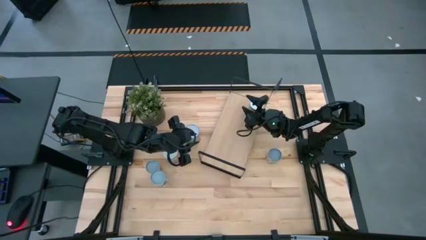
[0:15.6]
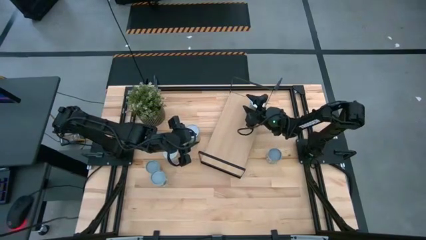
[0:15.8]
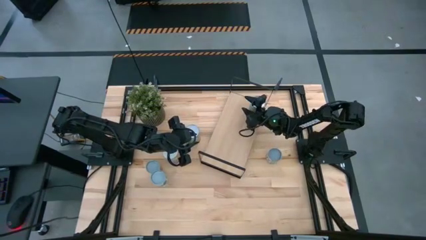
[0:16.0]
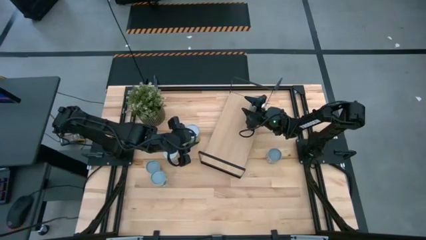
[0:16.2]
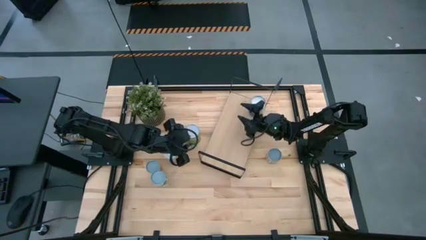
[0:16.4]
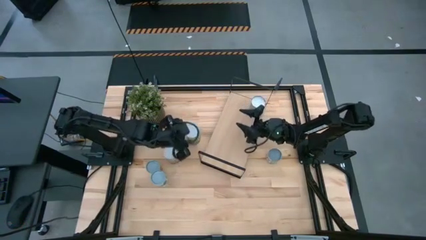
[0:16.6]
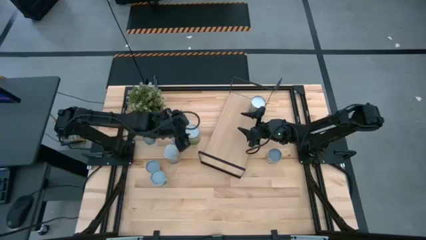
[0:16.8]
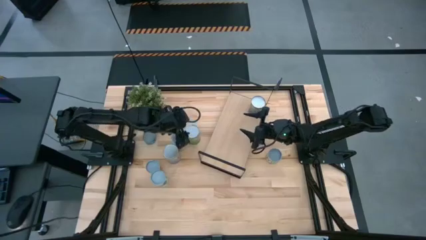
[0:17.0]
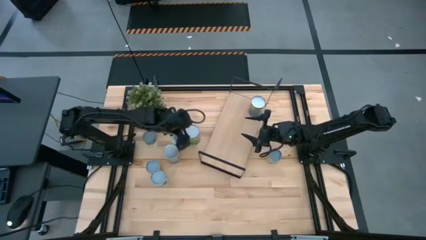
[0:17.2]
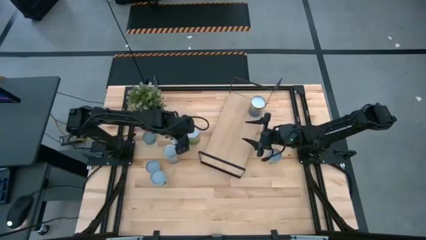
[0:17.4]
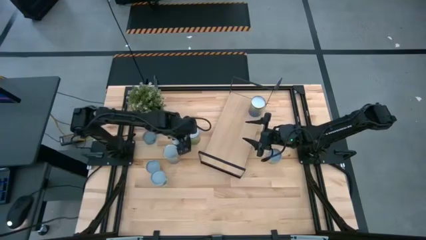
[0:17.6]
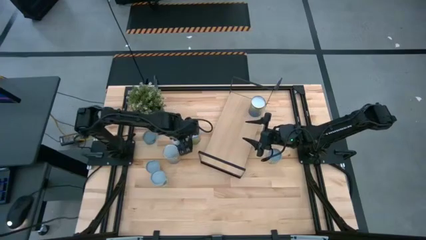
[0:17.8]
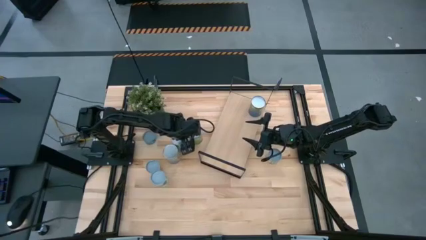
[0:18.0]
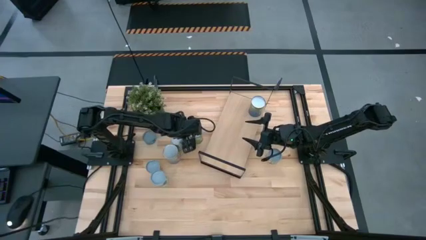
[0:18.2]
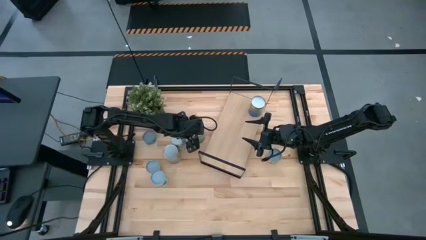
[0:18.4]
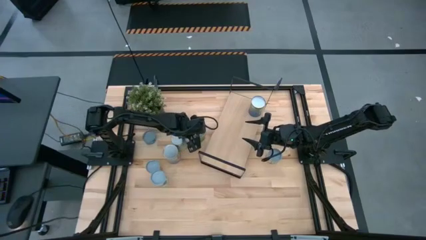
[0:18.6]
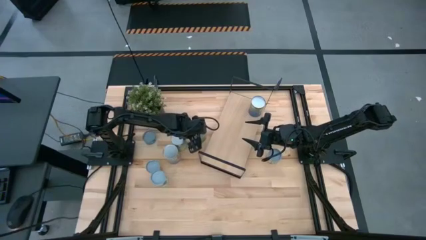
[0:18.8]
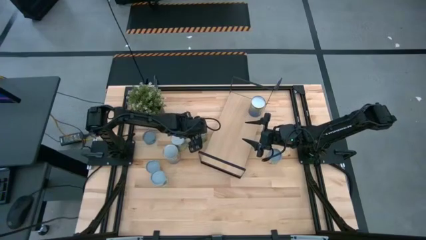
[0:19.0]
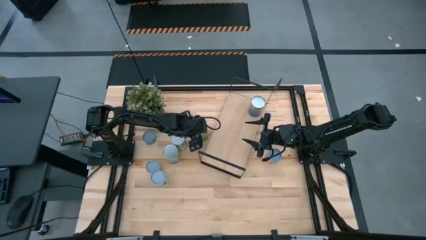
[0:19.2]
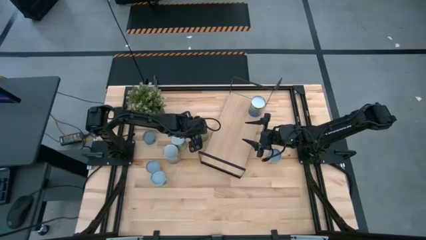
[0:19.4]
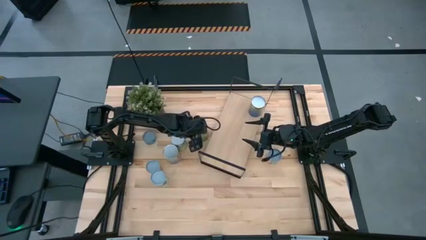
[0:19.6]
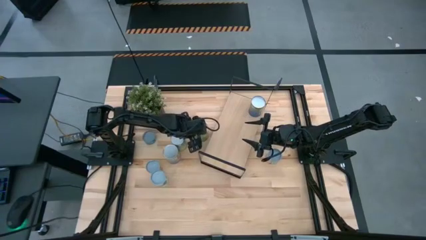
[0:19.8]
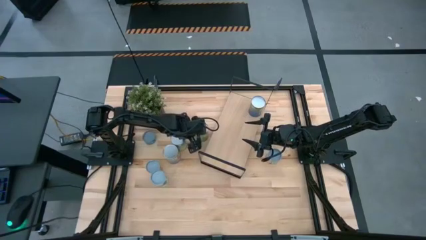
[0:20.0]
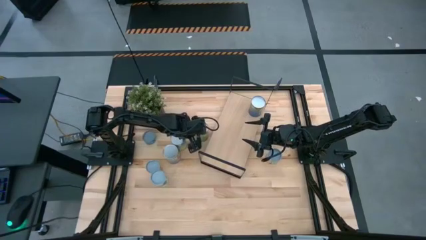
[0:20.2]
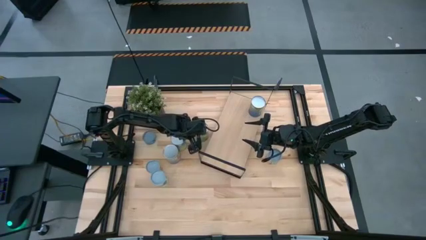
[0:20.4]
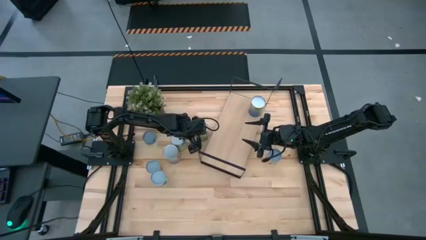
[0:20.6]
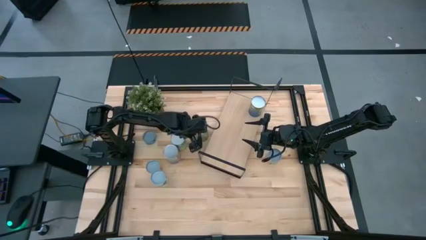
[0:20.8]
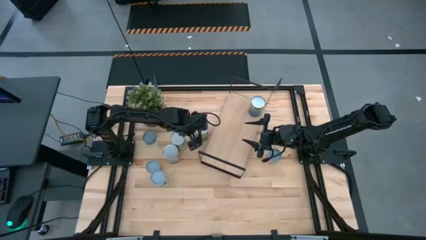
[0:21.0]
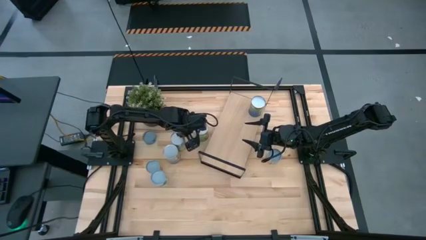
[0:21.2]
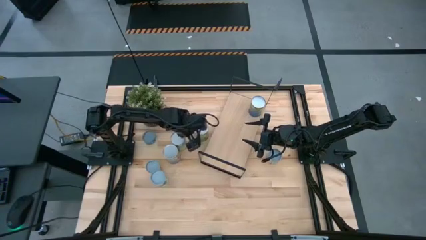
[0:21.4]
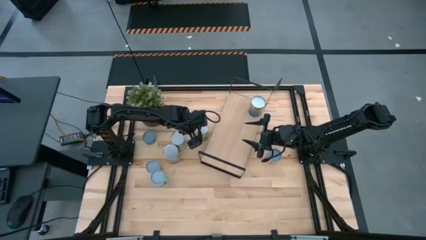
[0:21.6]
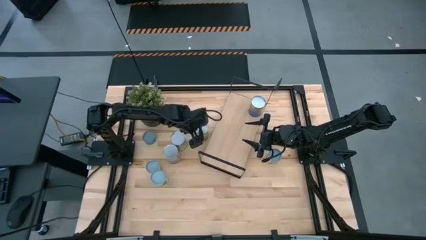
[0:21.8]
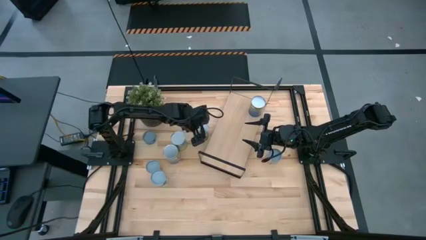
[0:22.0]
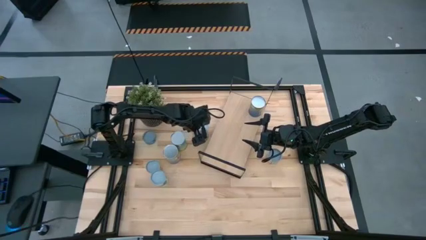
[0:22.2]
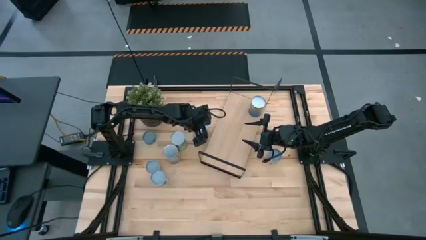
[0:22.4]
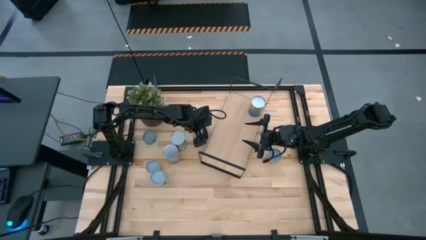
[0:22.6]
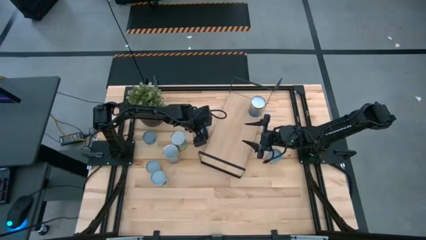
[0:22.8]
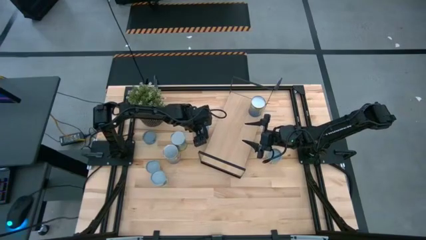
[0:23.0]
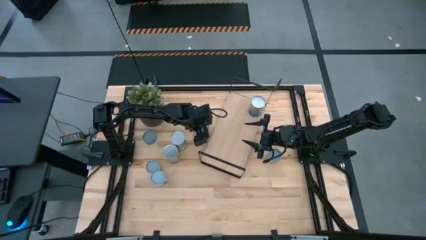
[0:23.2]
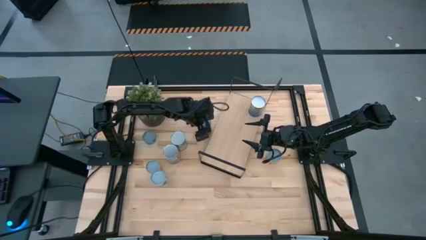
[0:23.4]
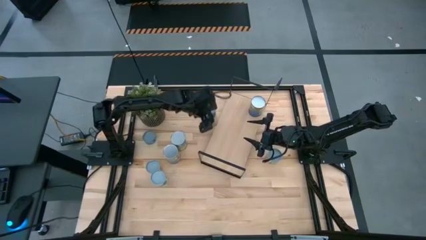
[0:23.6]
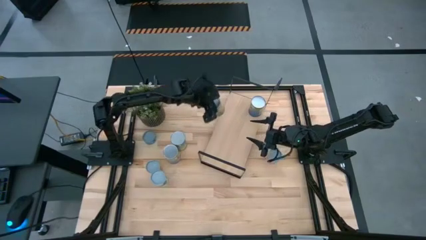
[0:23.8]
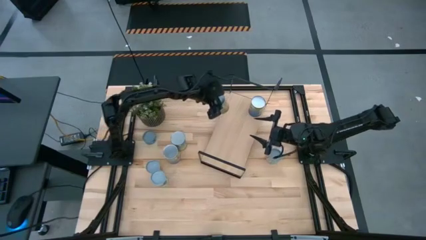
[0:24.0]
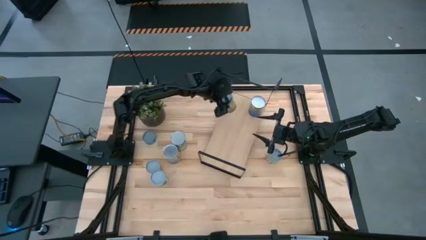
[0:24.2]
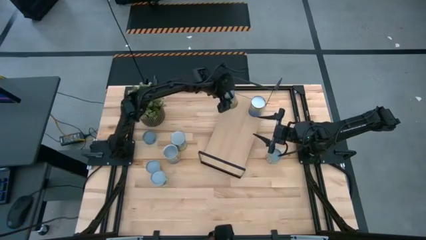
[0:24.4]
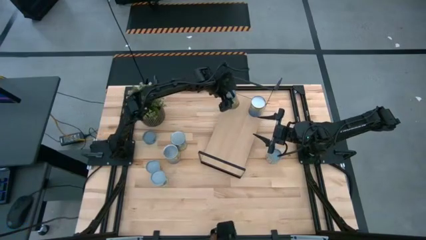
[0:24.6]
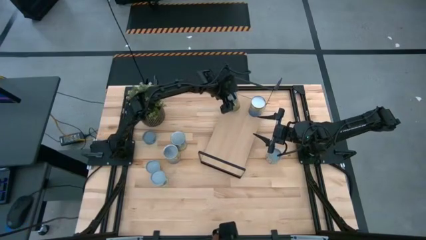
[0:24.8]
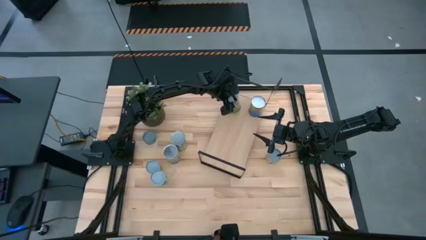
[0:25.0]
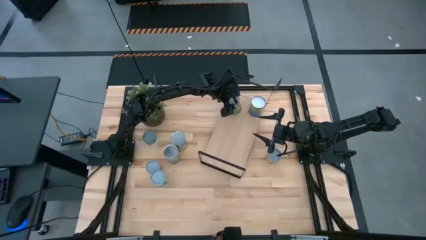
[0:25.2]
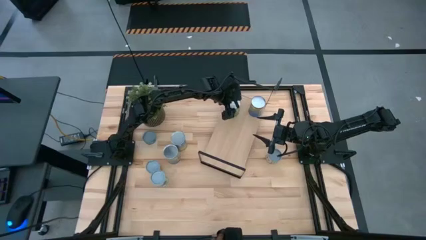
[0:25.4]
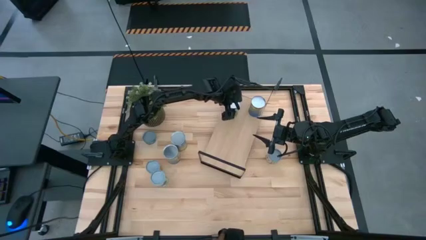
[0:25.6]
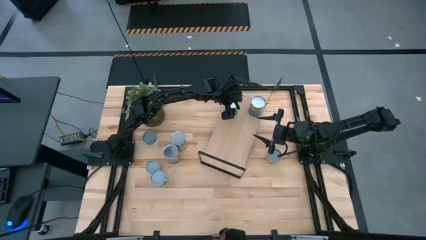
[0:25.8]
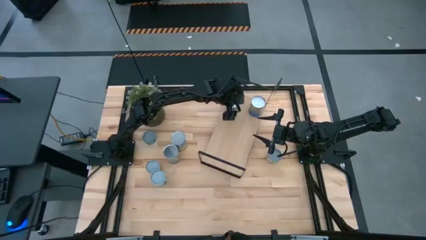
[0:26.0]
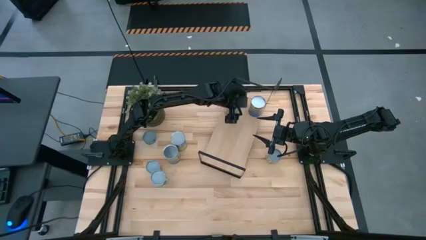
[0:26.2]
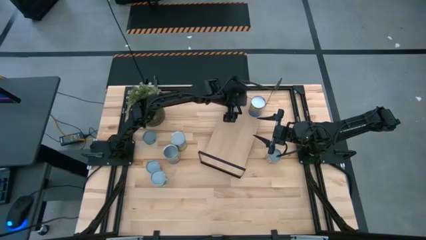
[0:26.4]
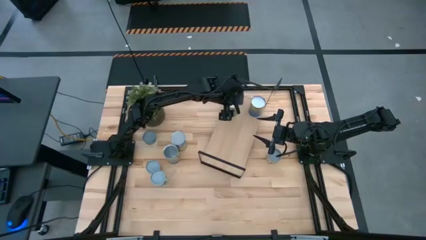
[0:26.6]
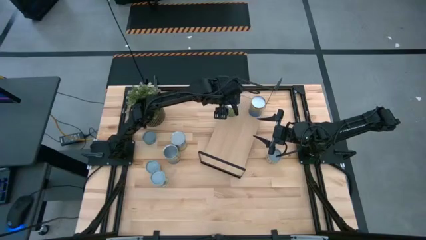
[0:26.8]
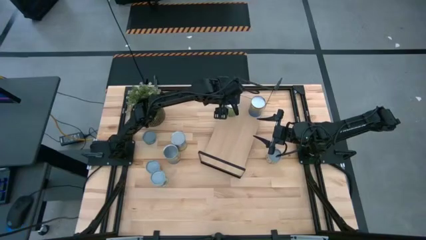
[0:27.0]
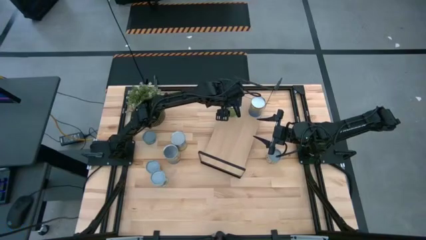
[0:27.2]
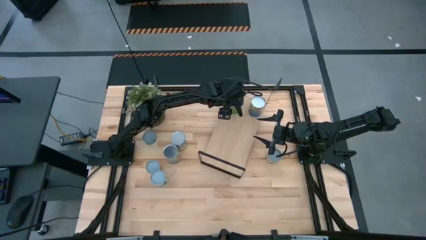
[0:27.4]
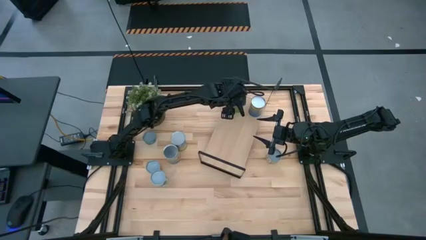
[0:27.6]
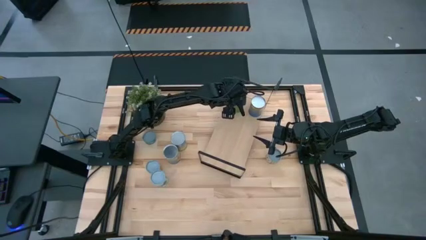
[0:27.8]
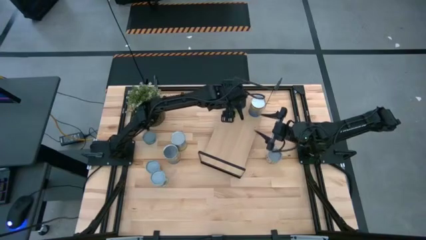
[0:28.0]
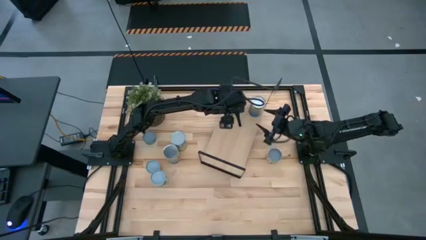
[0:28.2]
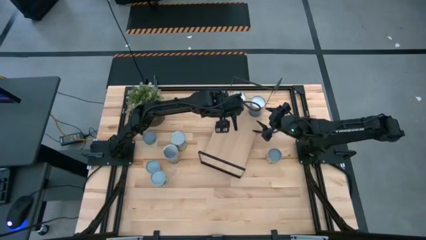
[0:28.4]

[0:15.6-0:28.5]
Task: Pick and place cans onto a shelf
Put the canned oranges on the shelf

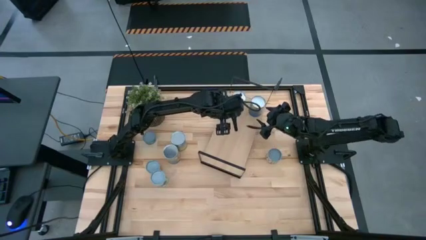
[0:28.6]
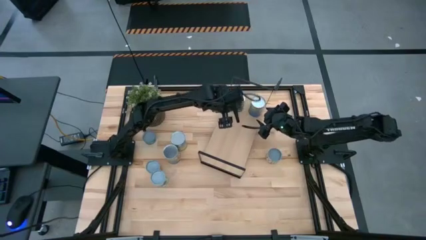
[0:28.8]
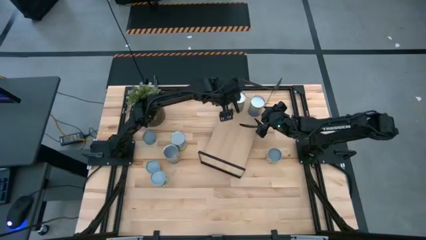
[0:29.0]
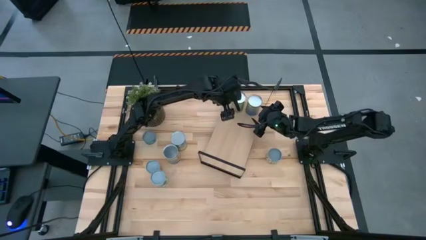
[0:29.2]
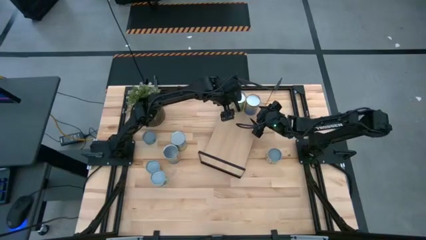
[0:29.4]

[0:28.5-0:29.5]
Adjust the canned peas on the shelf
